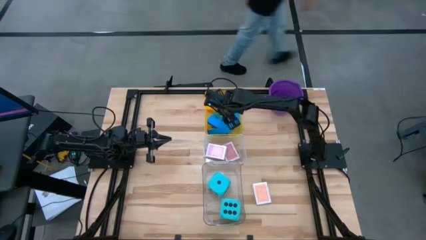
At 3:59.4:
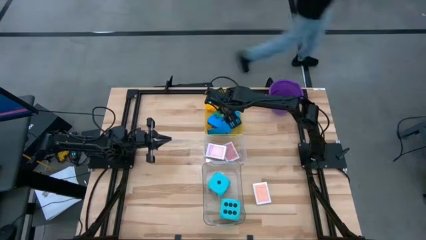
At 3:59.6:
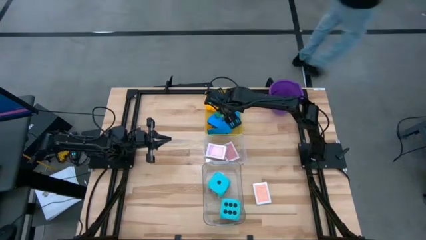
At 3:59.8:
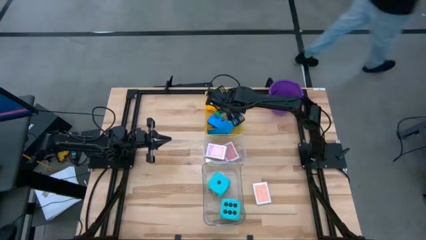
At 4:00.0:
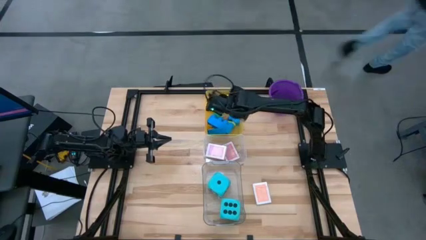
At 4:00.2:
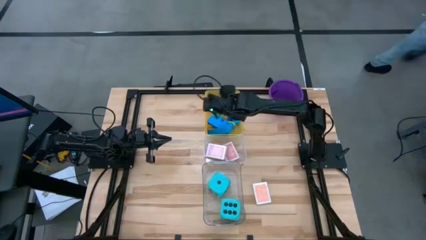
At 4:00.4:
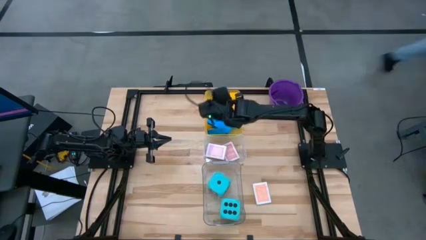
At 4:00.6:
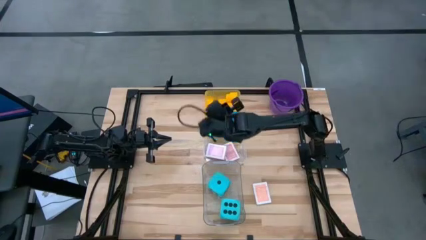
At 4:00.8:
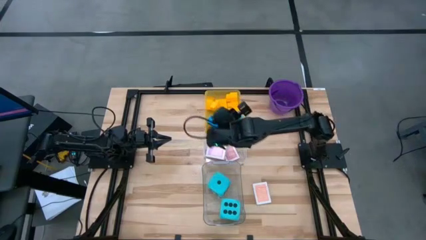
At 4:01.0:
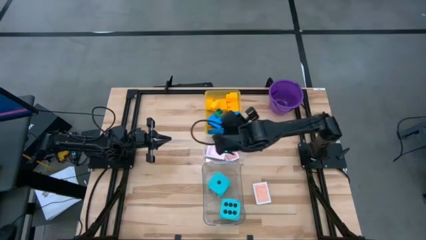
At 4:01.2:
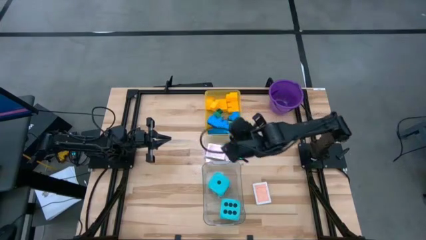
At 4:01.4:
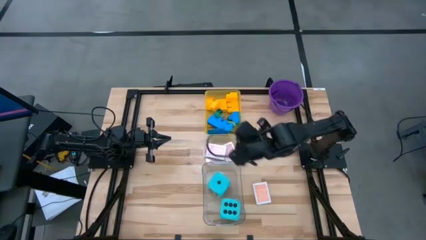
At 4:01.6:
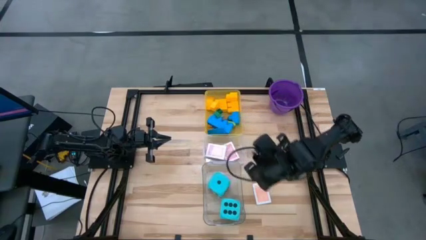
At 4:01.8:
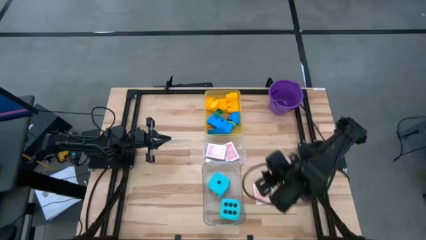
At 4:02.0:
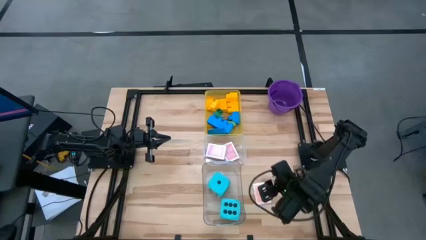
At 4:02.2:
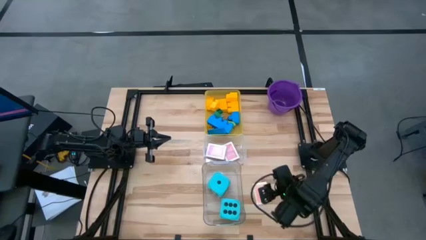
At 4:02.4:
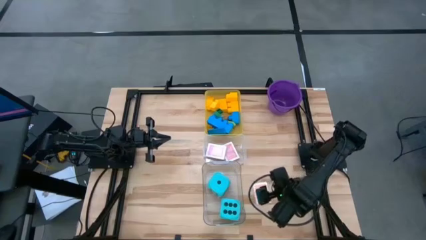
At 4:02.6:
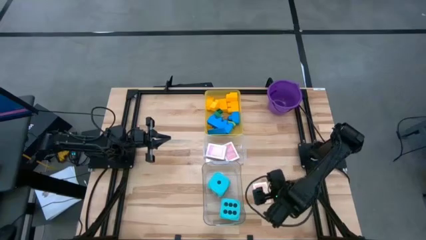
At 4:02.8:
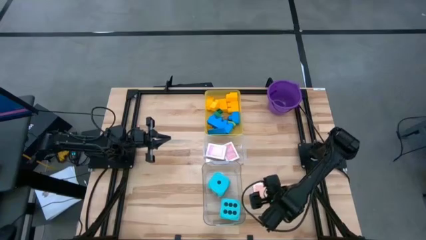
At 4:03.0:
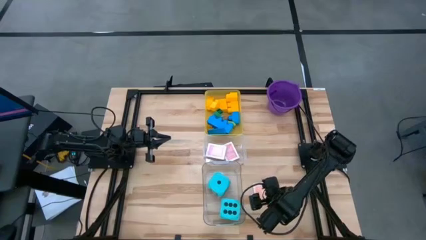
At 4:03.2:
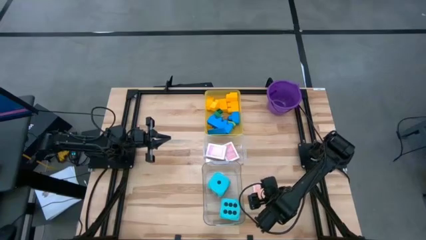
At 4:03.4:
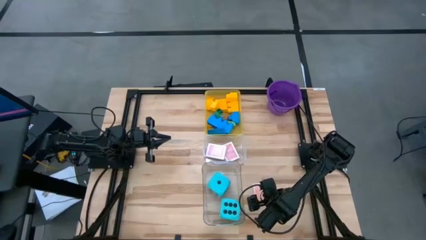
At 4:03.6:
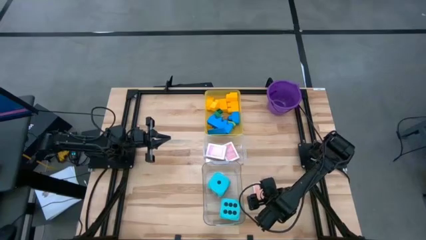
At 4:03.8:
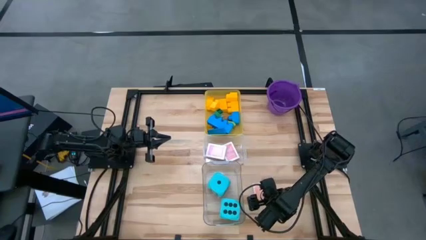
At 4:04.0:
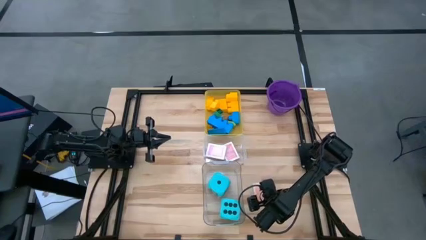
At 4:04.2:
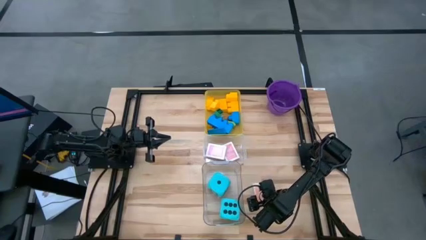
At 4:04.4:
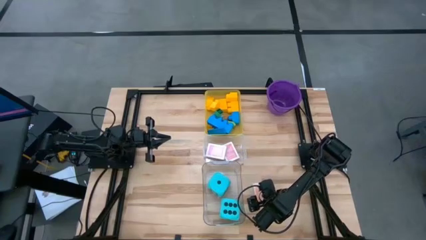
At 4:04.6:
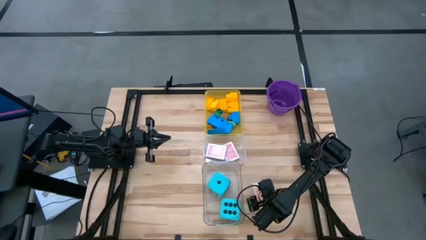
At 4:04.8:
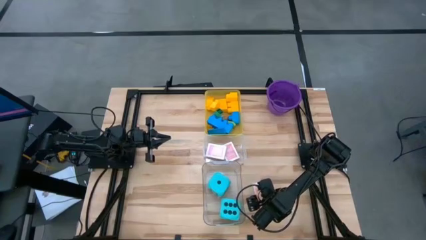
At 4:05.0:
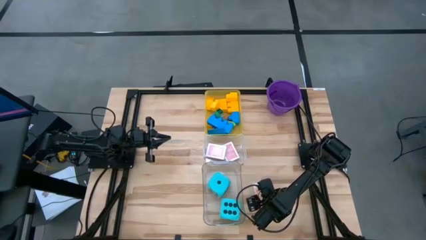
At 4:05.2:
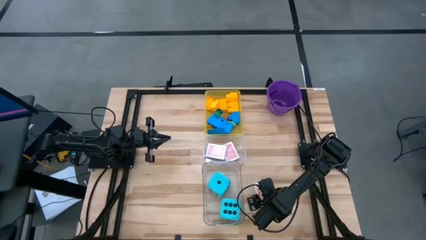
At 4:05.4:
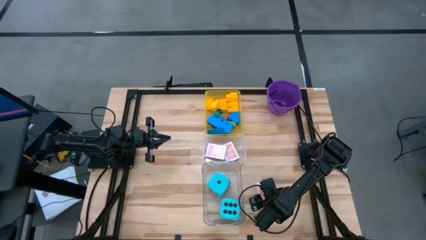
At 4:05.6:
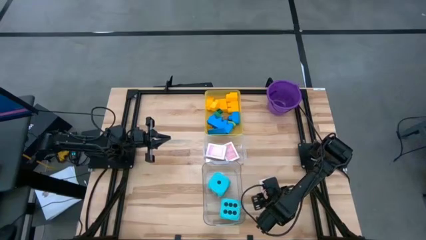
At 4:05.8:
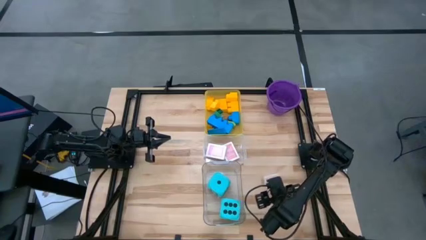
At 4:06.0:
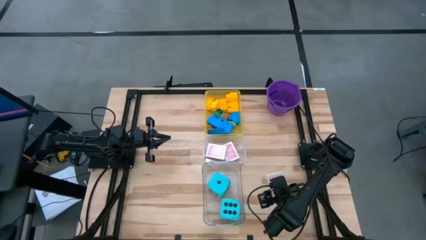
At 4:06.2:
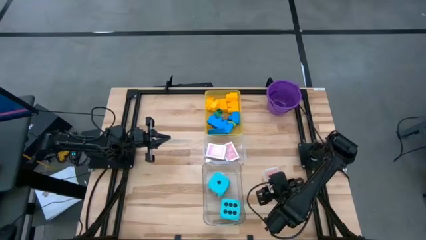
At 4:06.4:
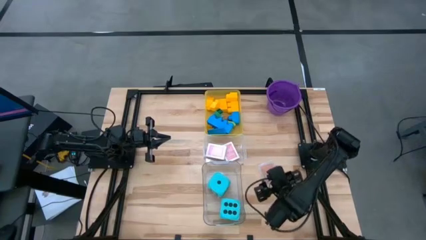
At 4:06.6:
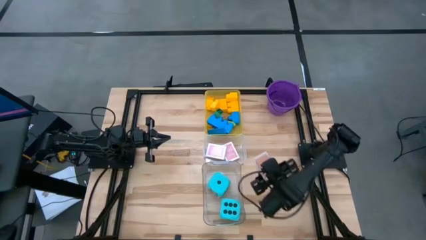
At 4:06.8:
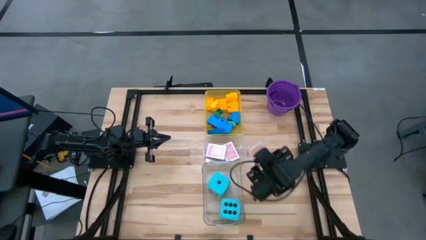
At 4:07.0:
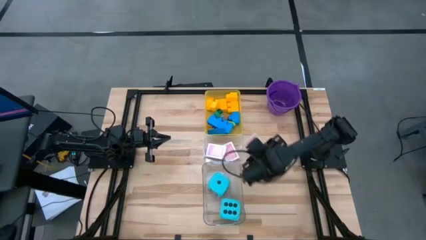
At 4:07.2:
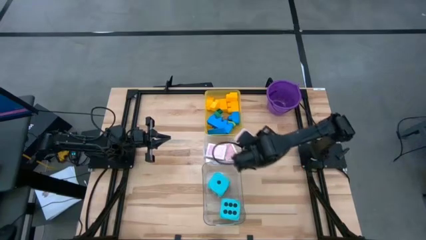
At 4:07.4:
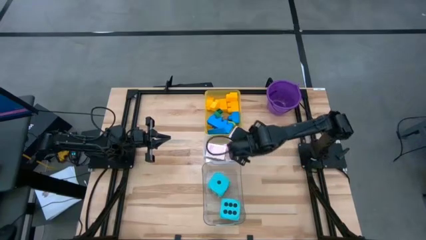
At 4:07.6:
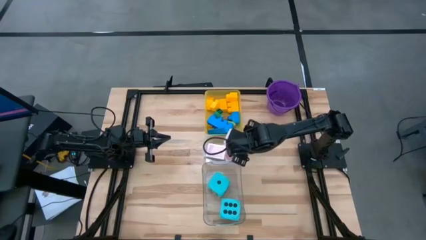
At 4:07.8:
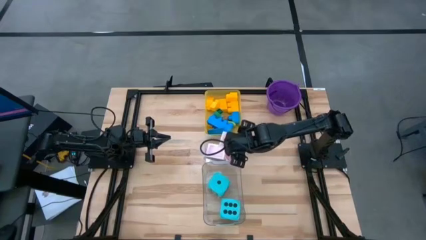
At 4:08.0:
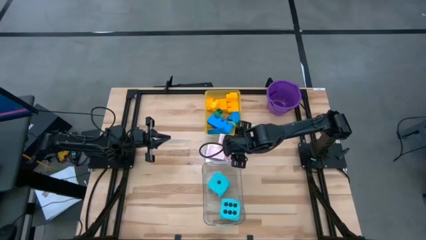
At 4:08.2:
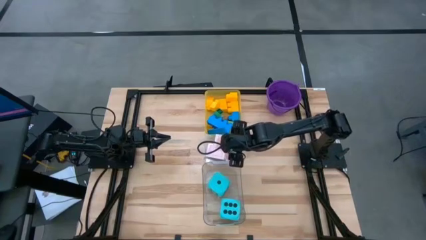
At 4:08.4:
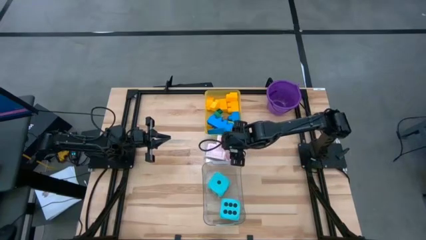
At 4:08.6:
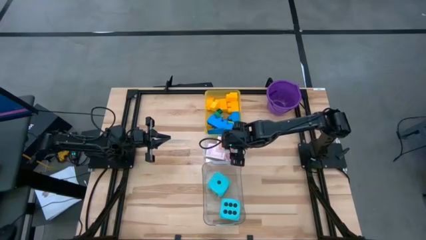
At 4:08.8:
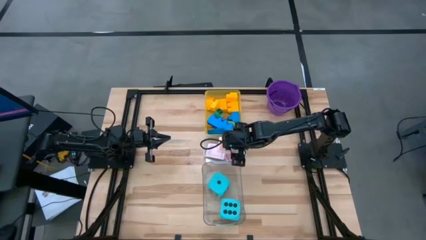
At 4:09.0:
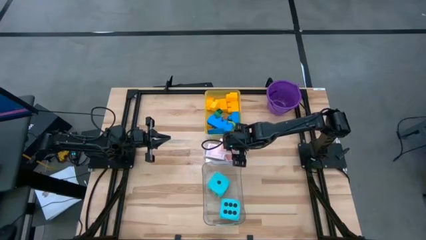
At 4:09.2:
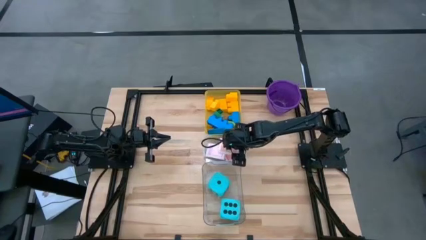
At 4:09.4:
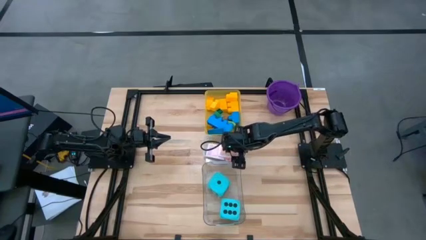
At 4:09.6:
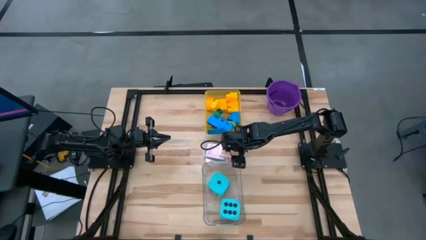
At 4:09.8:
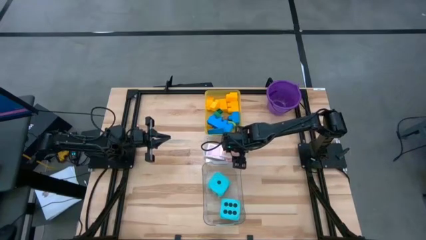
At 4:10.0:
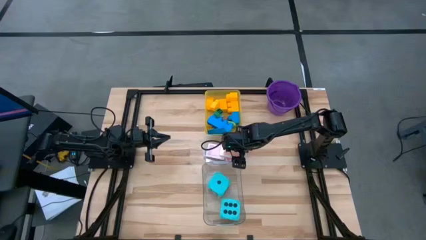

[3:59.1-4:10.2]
Task: Pick & Place Toys
Put the orange deck of cards into the top transparent bin

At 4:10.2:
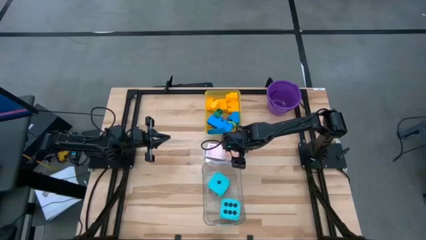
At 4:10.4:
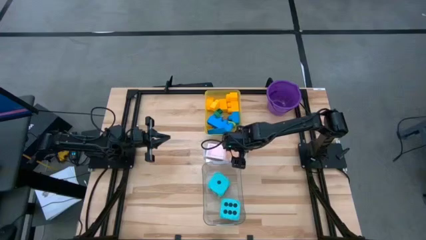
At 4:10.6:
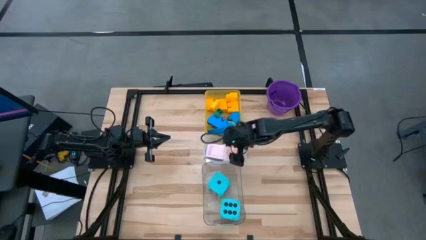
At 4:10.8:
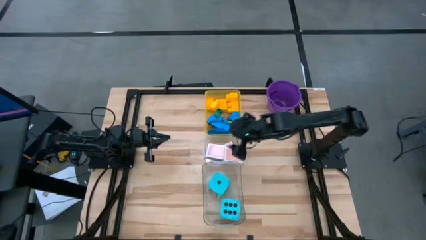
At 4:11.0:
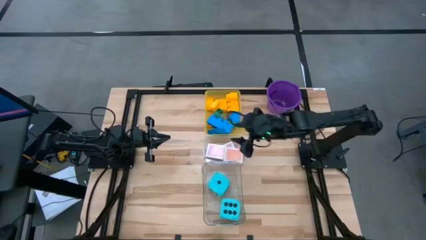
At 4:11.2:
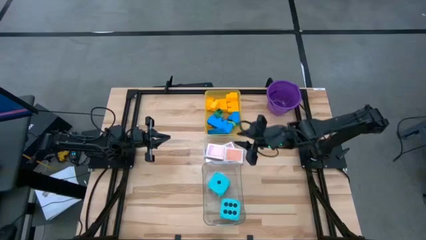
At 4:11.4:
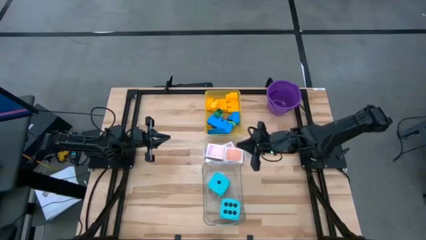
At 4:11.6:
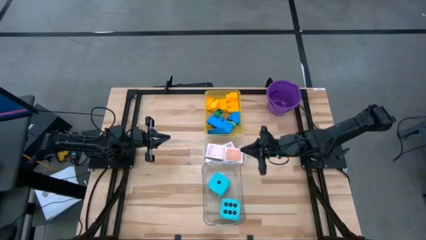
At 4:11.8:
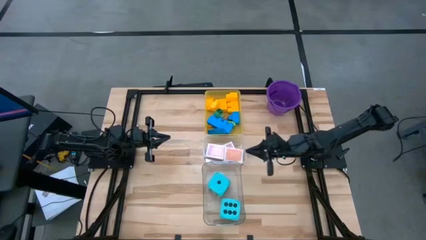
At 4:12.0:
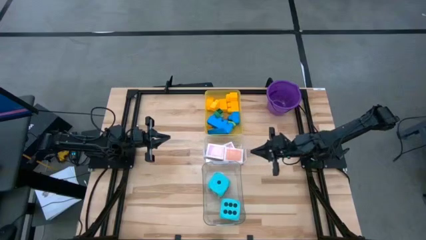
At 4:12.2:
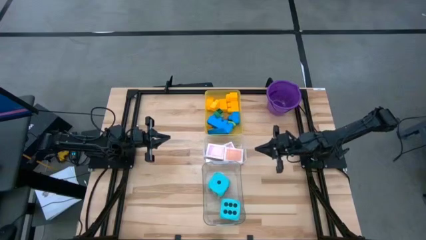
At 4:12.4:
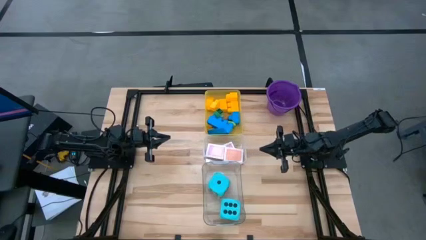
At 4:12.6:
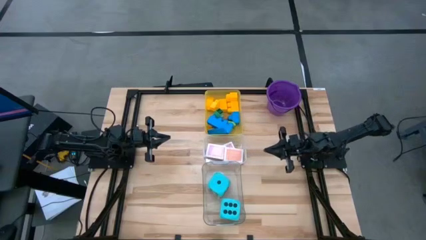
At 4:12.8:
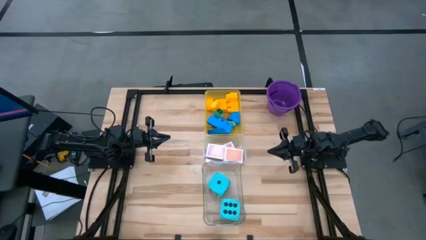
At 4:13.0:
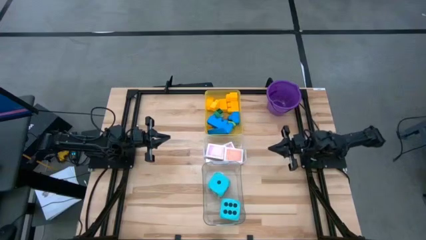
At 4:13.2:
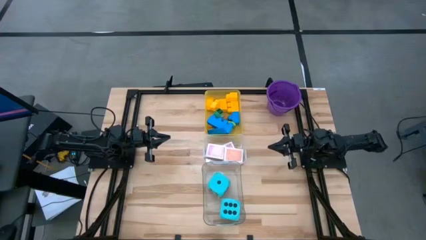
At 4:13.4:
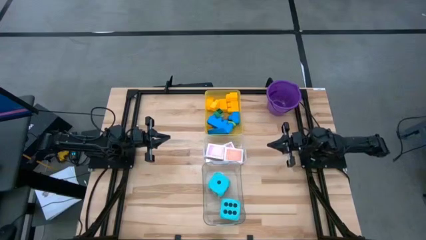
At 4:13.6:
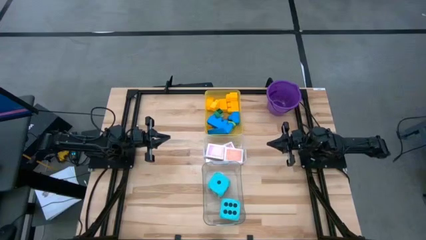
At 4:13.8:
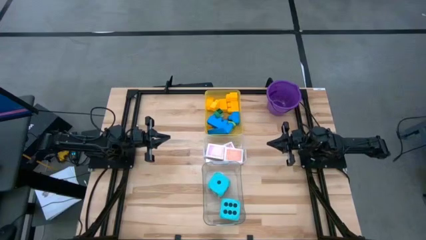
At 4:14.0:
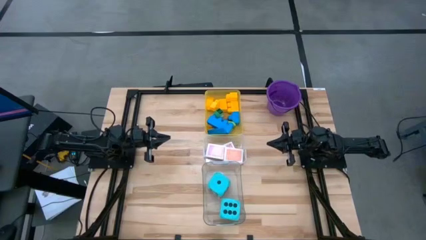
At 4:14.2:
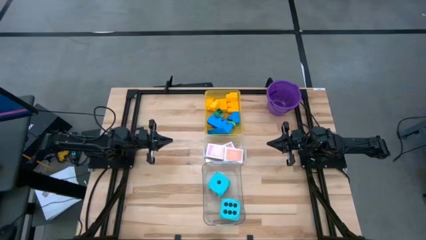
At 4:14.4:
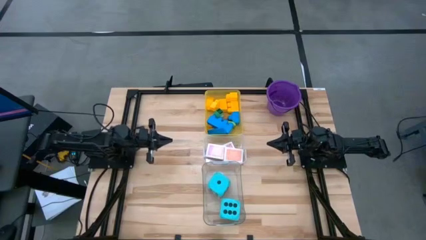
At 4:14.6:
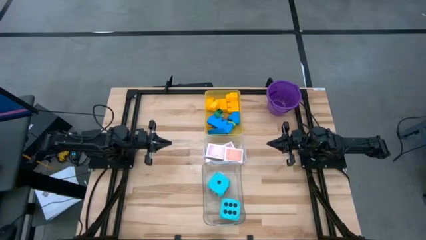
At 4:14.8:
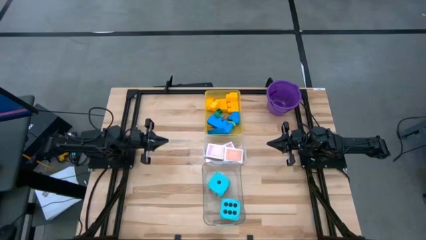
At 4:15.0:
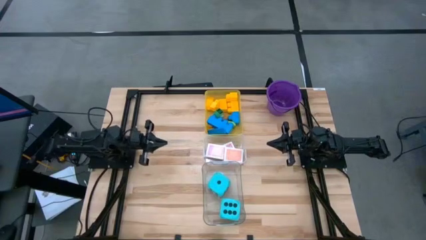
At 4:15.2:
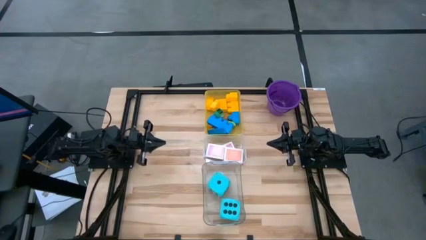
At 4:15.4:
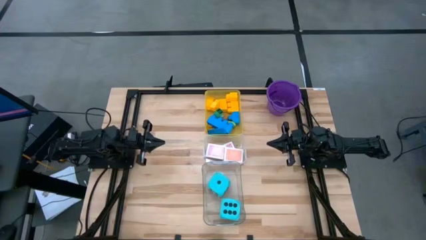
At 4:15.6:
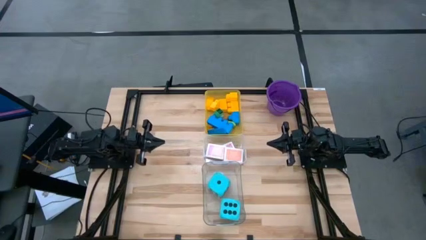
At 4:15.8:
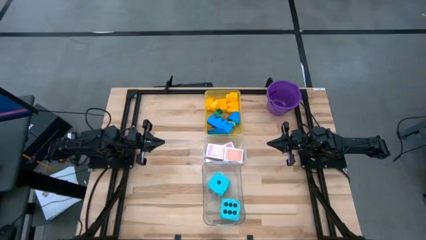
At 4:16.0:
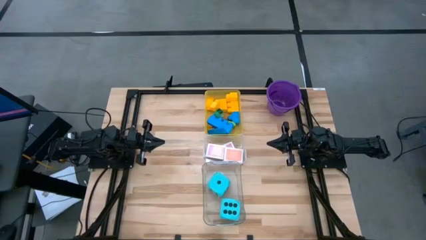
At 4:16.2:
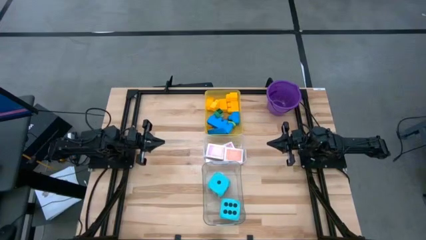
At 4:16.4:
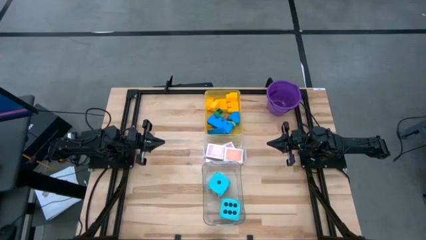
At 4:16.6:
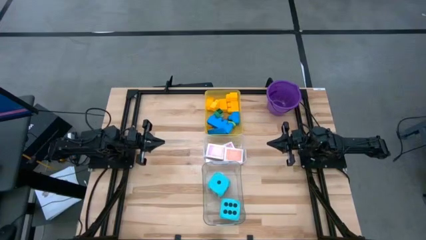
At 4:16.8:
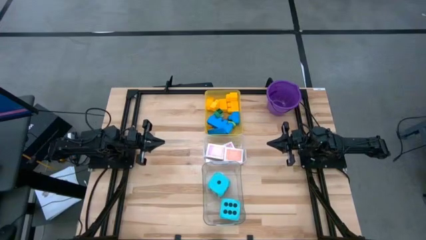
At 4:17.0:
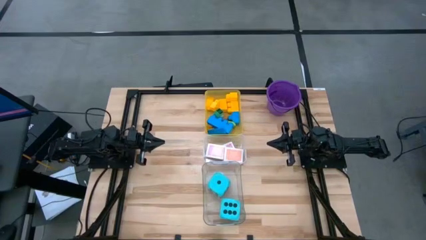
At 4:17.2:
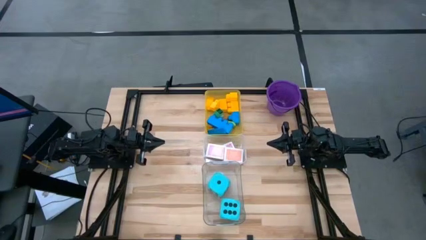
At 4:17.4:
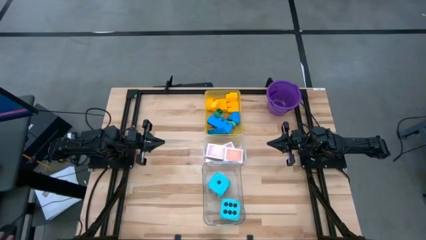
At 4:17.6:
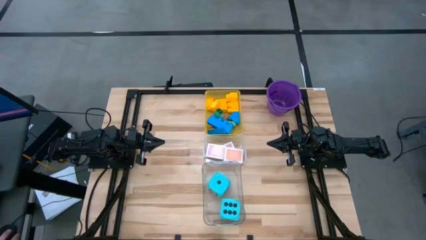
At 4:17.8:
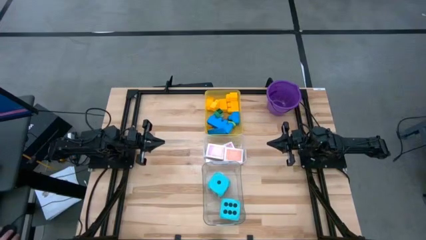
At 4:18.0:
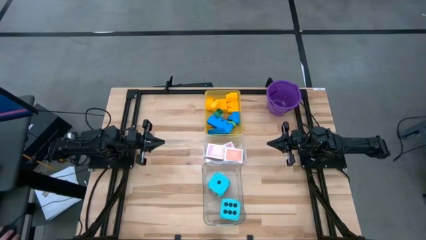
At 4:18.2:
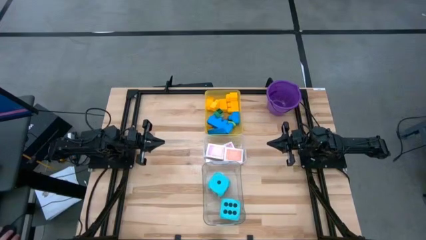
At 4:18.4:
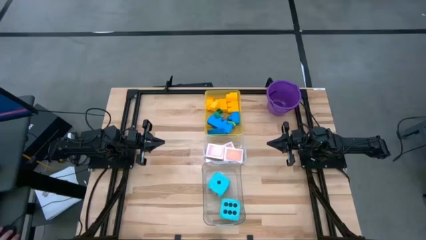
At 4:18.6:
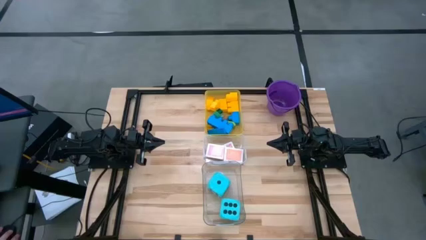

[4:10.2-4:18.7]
Return to Home Position
